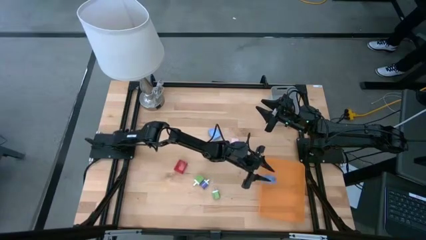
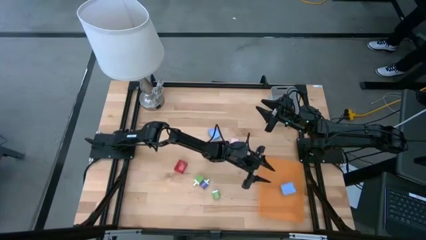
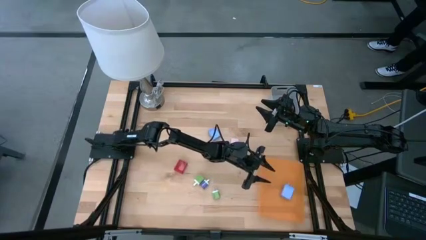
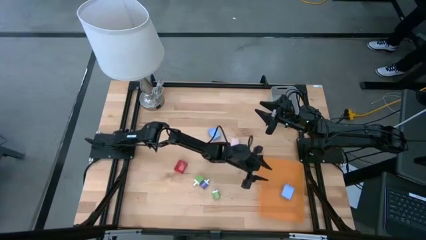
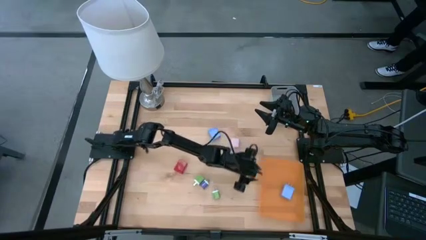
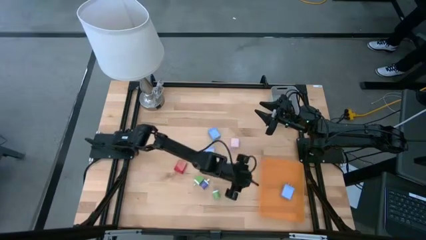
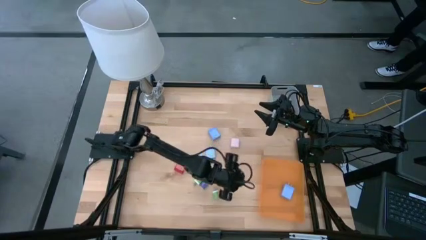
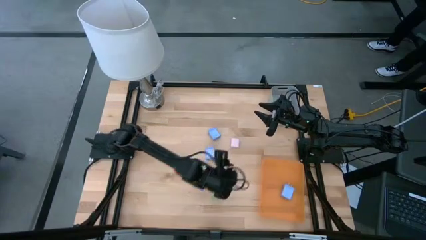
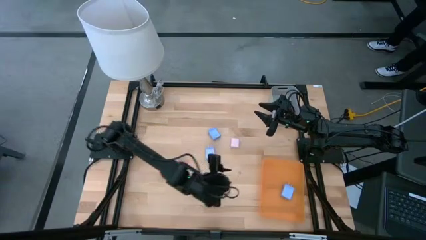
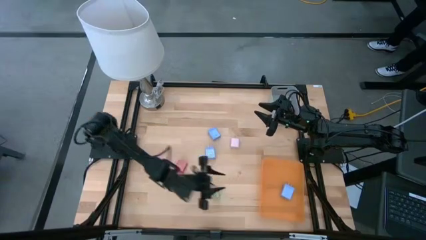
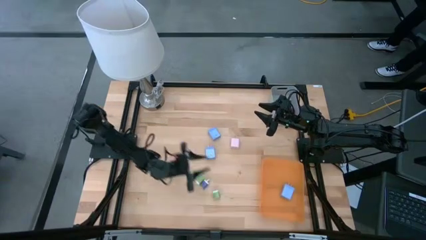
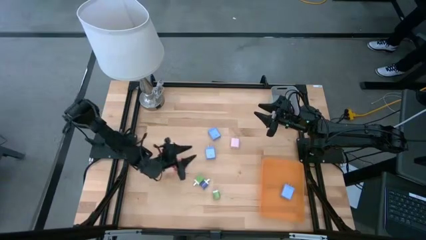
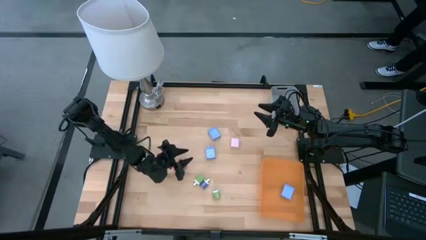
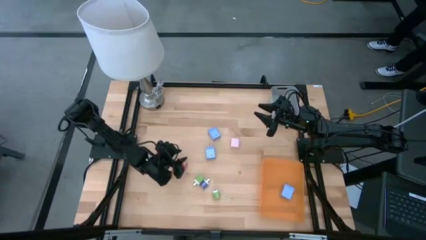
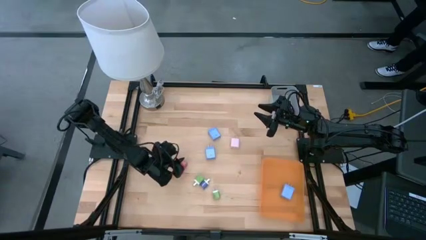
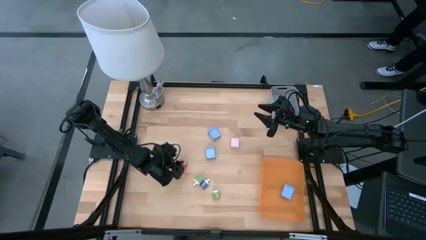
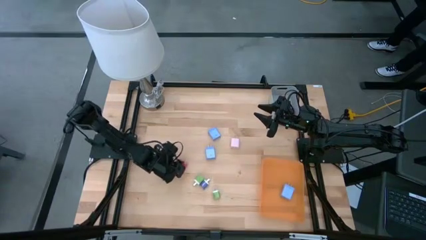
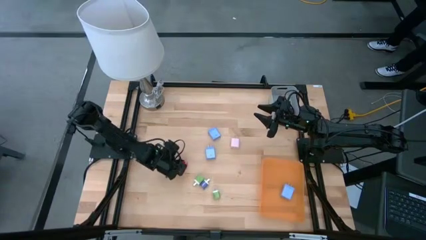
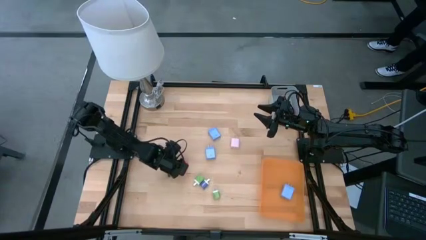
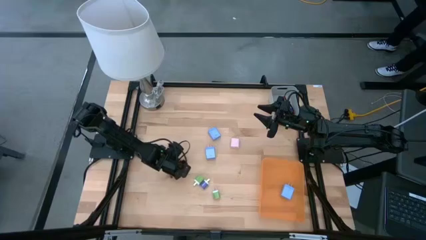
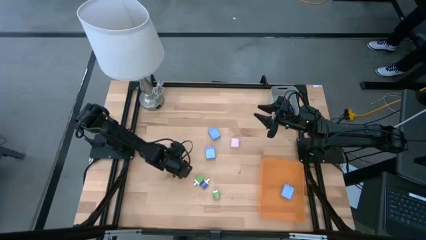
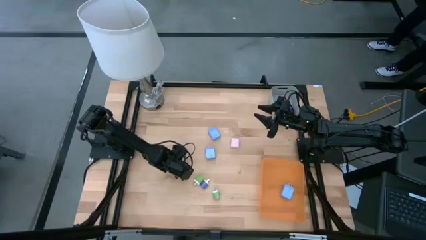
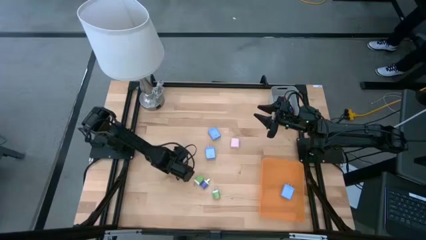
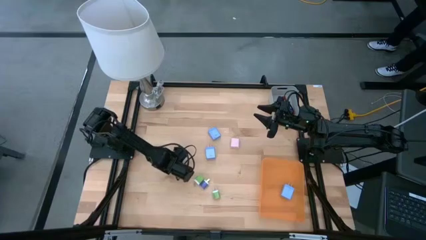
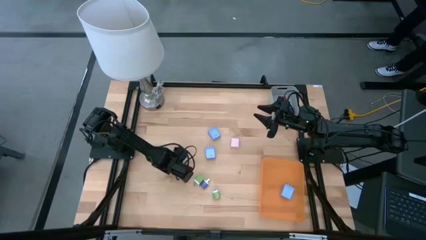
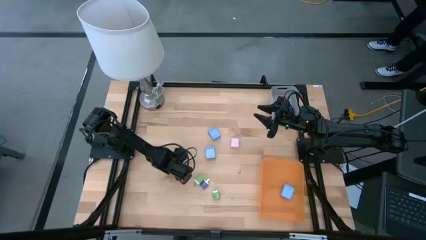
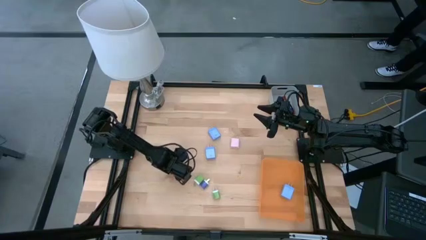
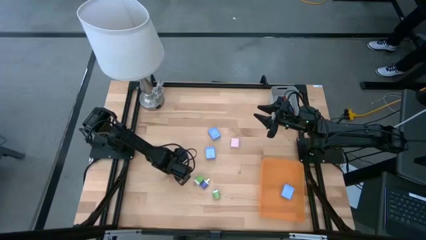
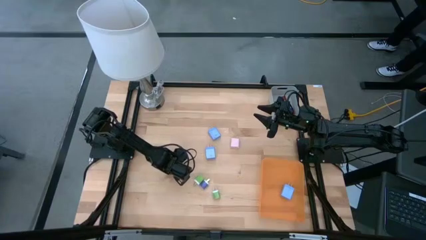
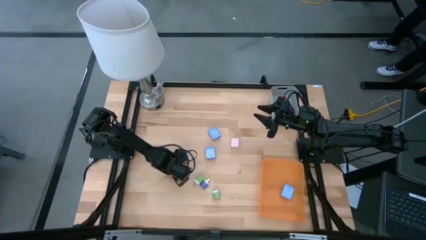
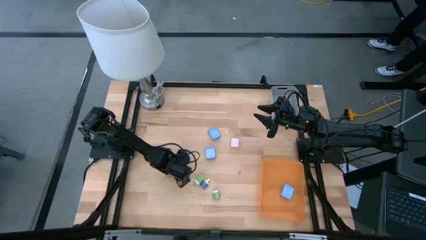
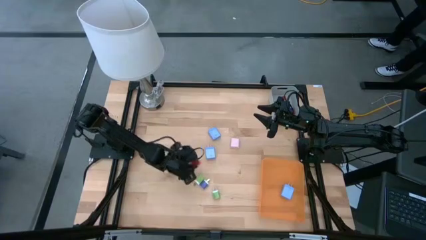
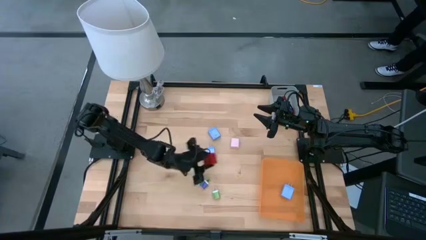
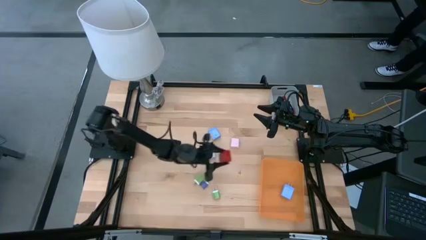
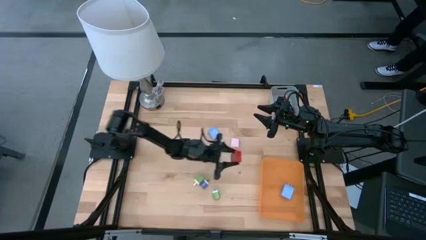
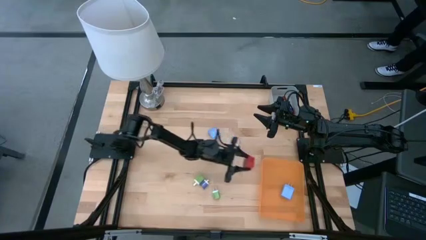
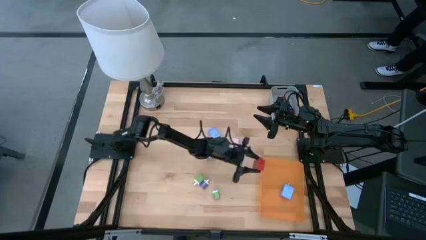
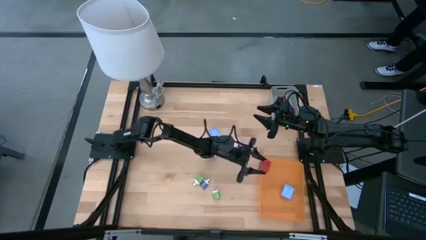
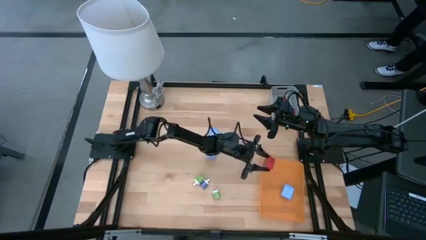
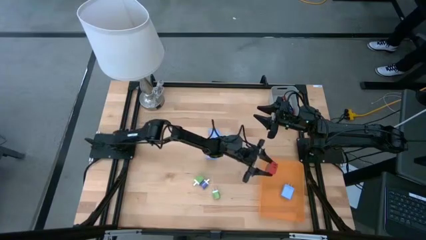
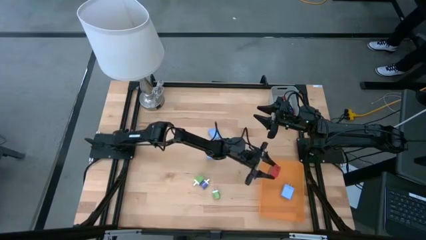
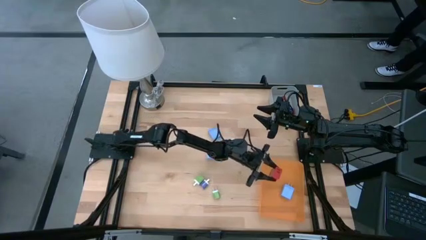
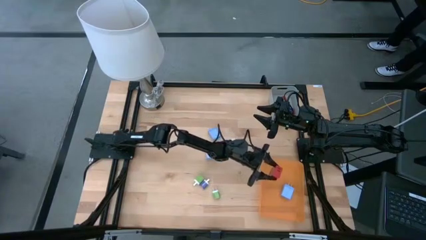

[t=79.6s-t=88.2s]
Task: Pick & Place Office items
Put the red charger adapter into the orange bin

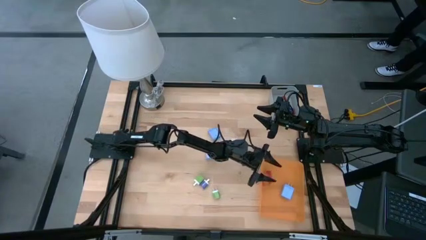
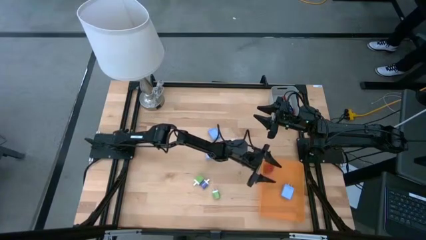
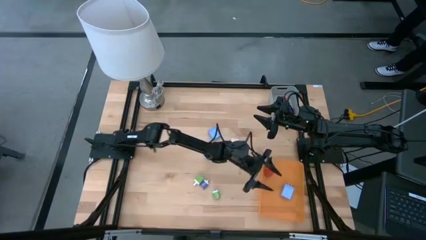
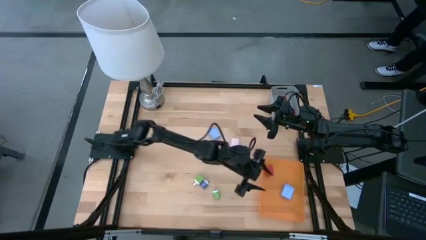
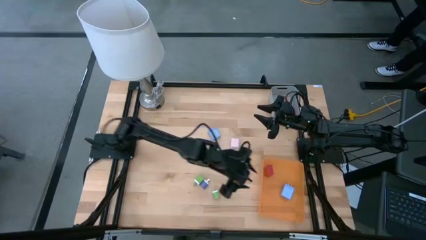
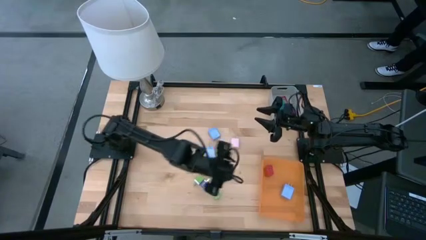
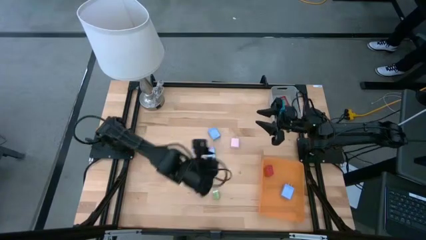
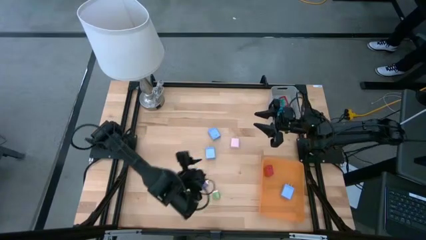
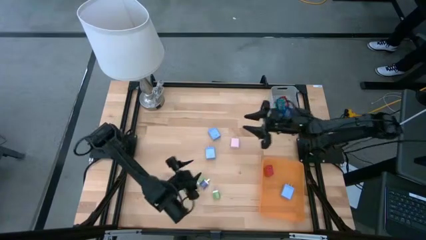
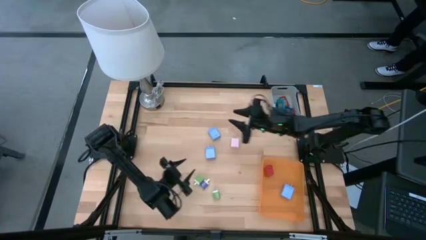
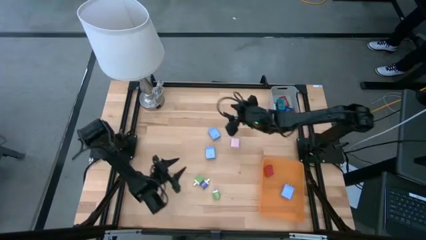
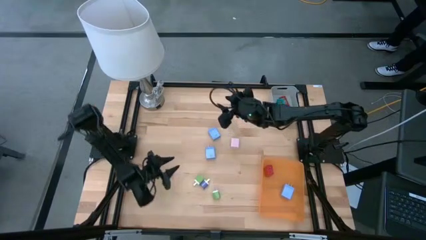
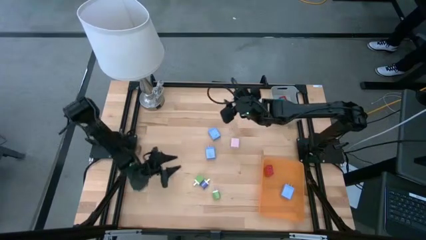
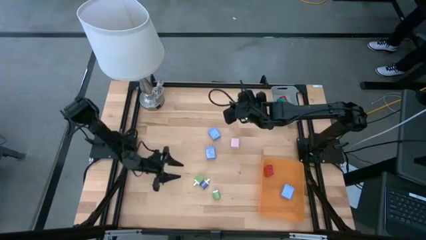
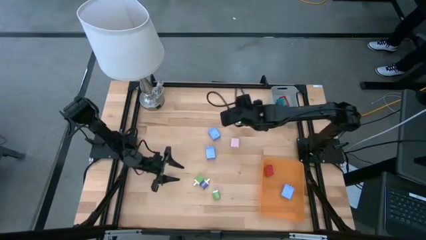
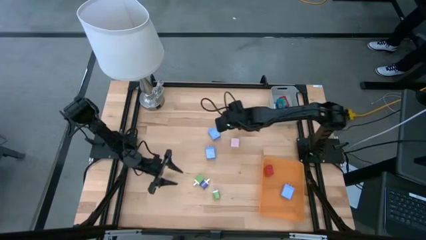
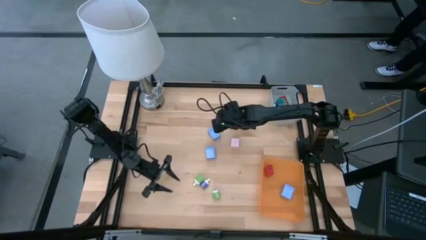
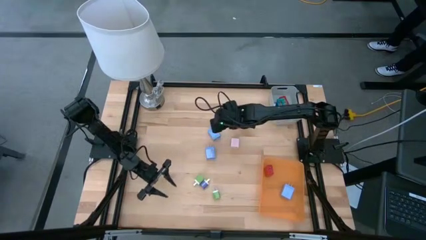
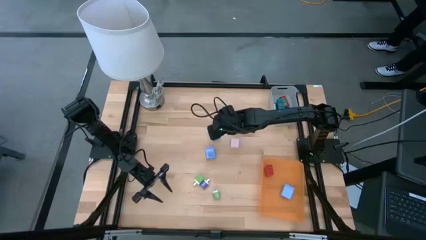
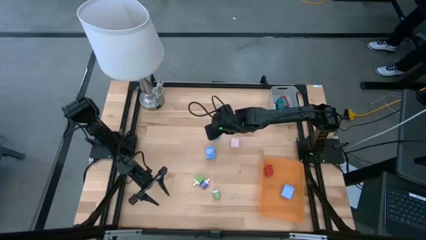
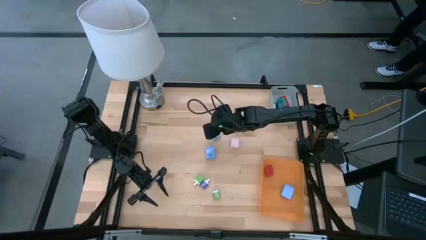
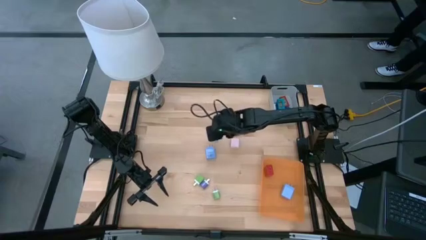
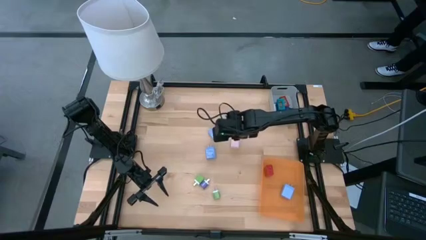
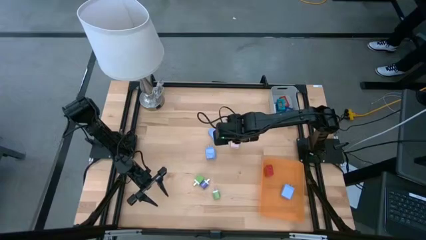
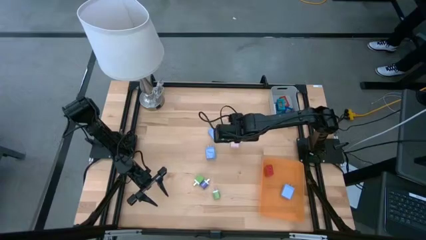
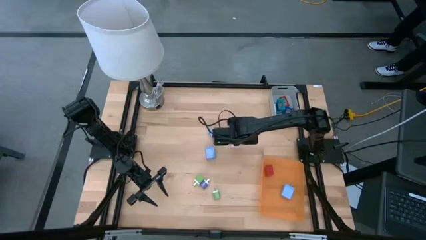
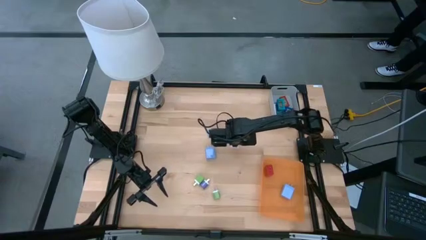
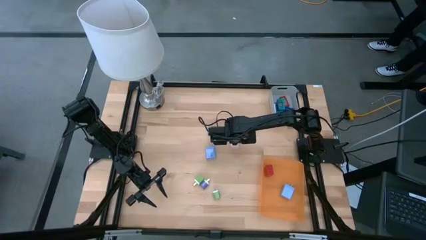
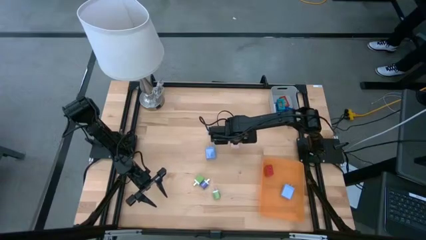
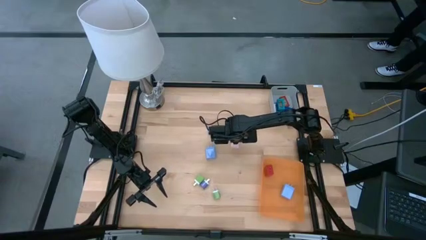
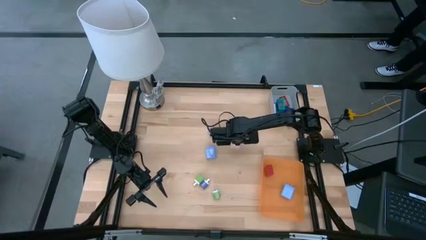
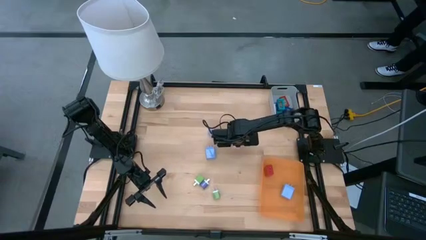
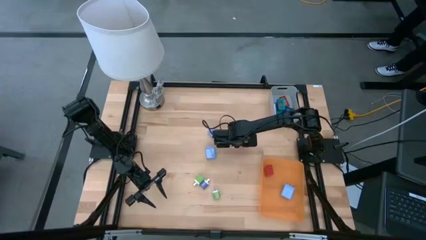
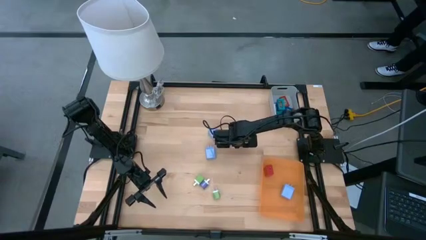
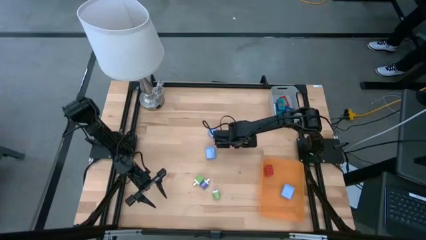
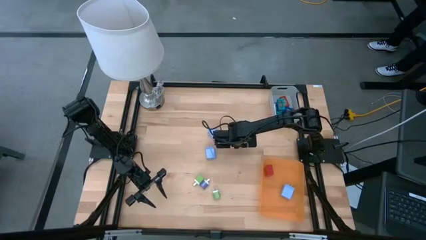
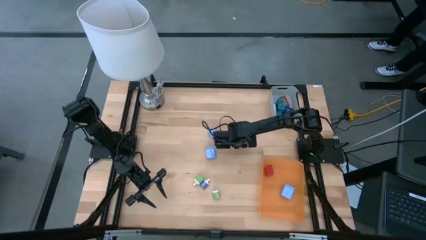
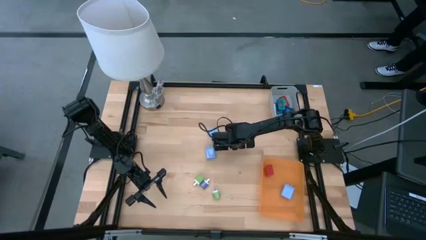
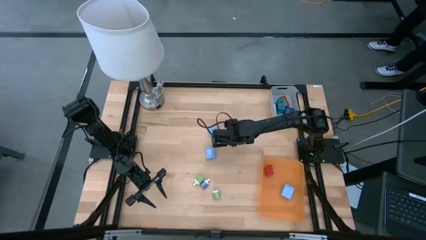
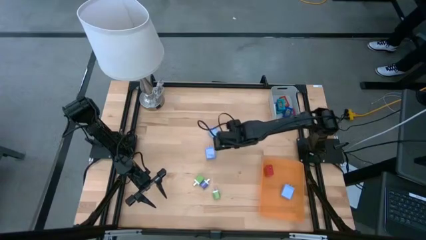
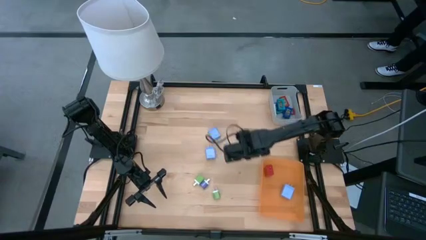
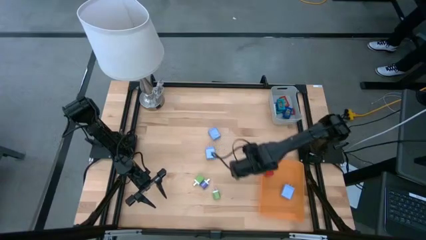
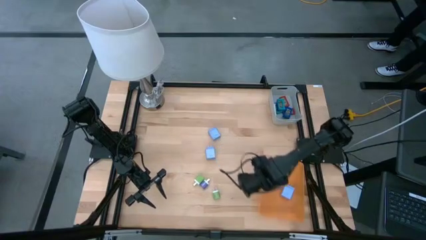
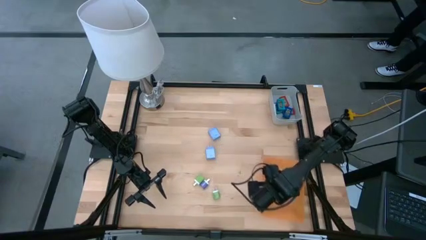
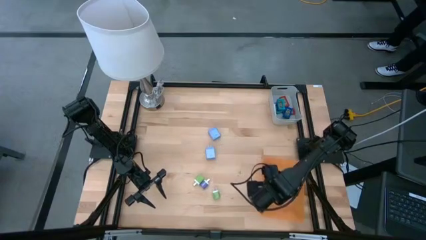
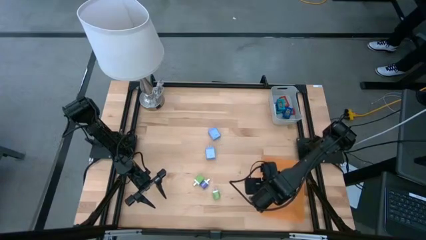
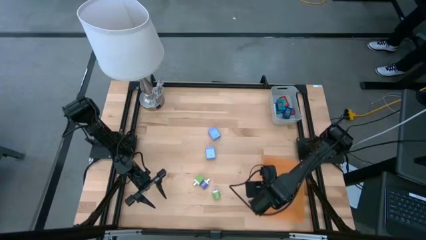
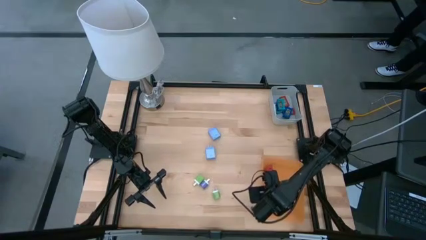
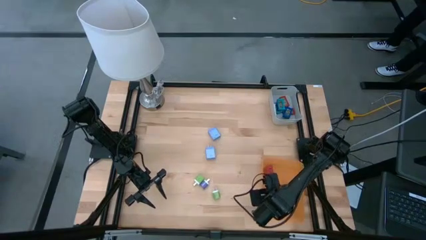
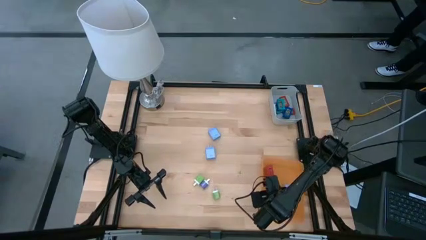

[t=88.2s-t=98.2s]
Put the pink charger adapter into the orange bin
